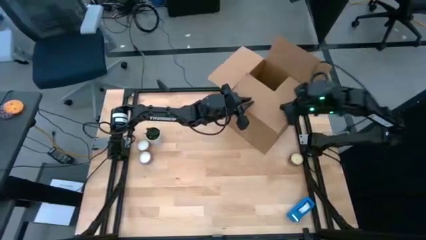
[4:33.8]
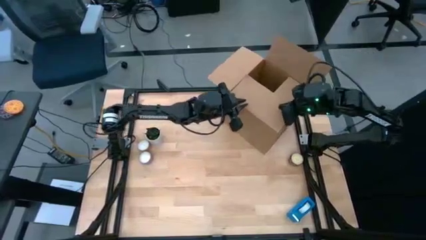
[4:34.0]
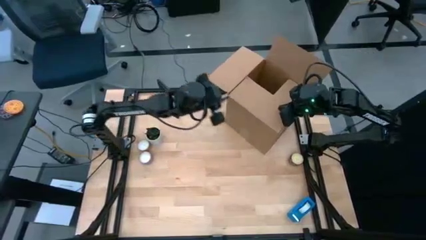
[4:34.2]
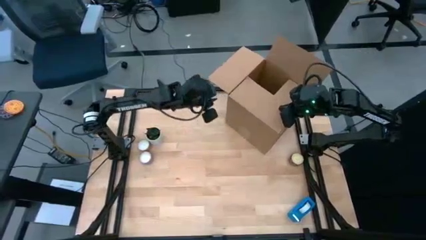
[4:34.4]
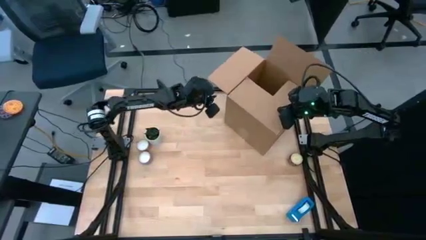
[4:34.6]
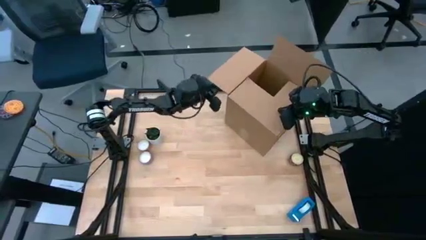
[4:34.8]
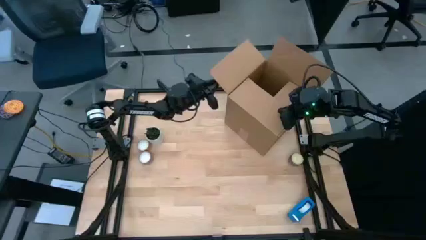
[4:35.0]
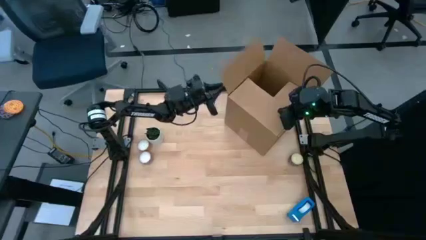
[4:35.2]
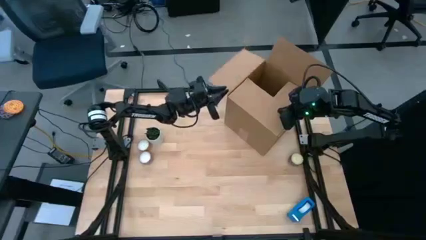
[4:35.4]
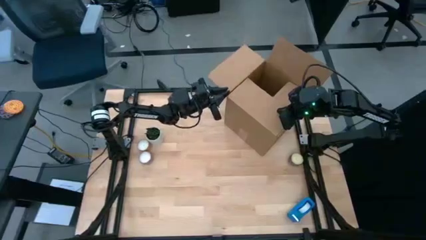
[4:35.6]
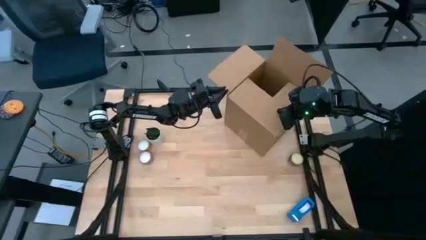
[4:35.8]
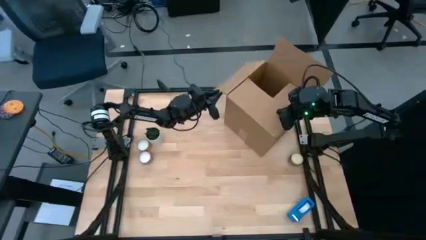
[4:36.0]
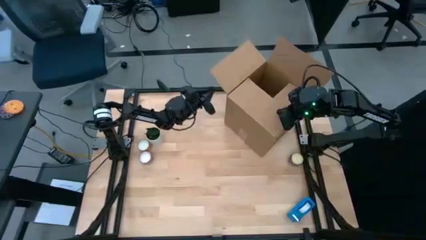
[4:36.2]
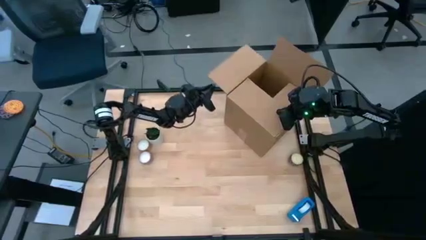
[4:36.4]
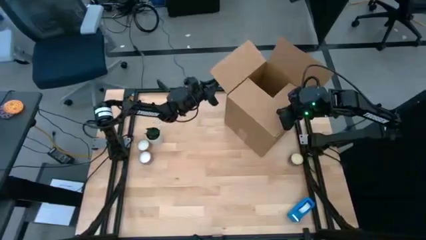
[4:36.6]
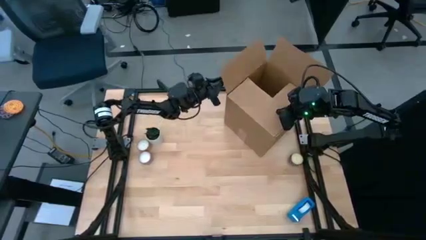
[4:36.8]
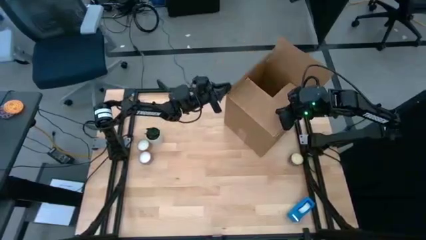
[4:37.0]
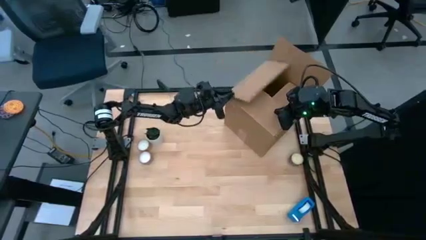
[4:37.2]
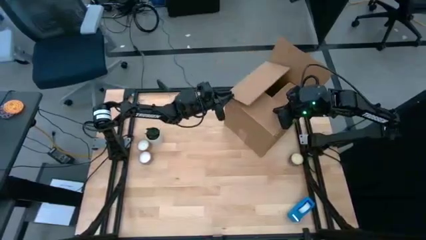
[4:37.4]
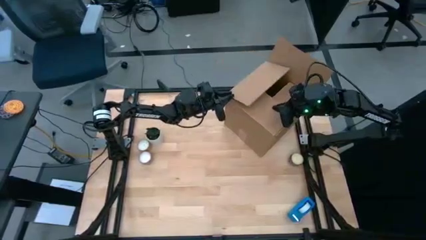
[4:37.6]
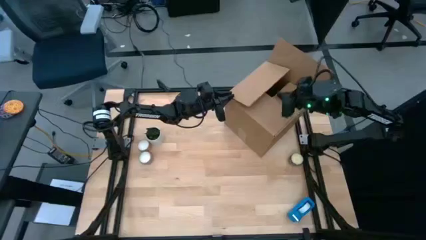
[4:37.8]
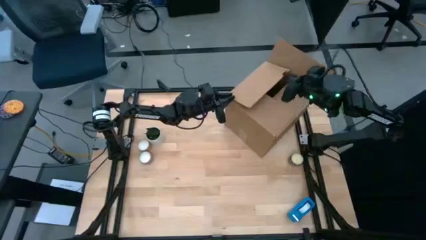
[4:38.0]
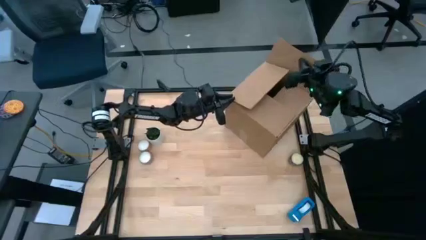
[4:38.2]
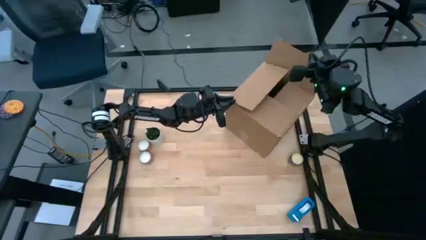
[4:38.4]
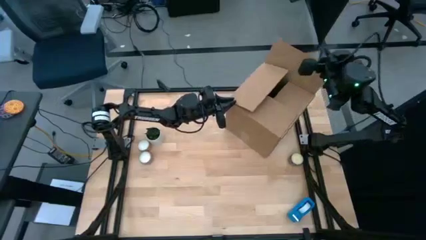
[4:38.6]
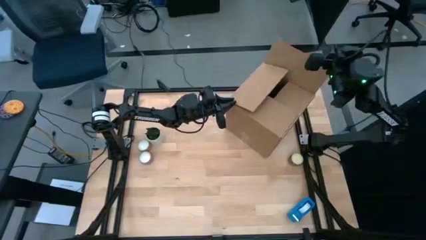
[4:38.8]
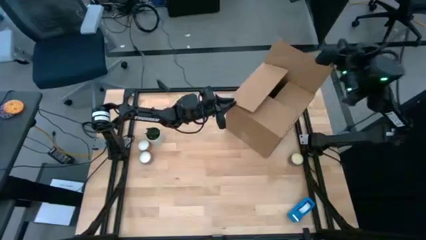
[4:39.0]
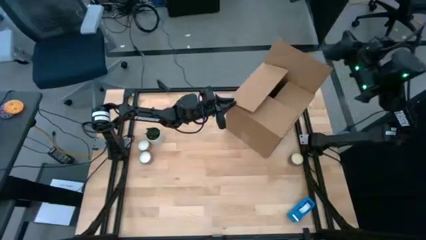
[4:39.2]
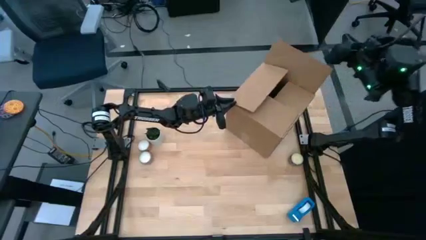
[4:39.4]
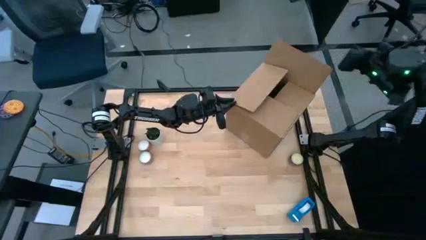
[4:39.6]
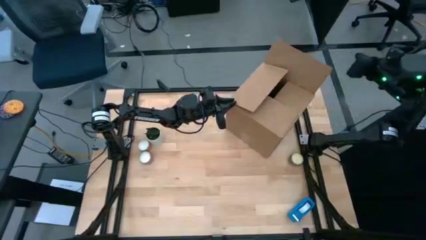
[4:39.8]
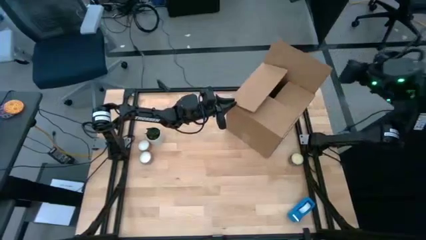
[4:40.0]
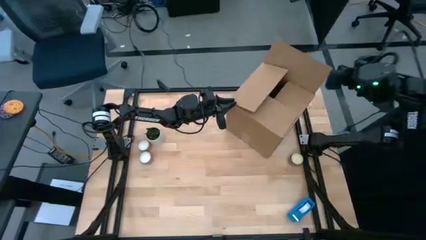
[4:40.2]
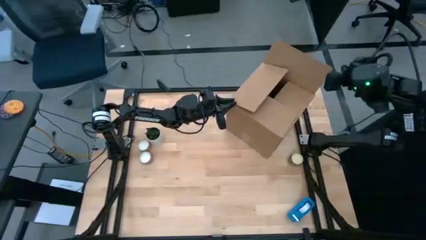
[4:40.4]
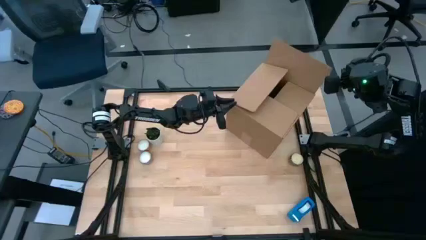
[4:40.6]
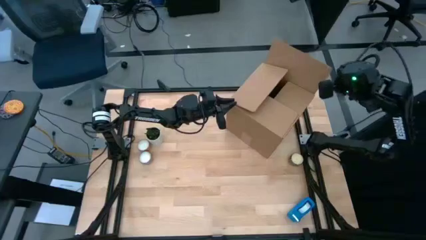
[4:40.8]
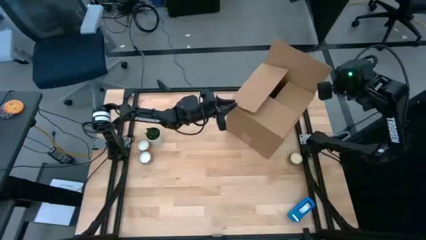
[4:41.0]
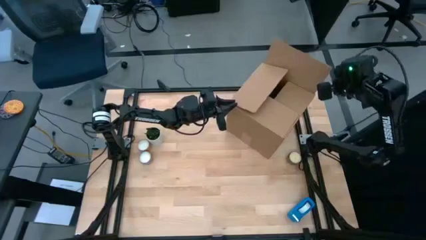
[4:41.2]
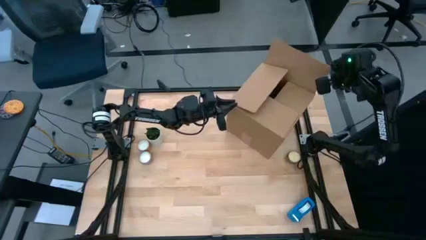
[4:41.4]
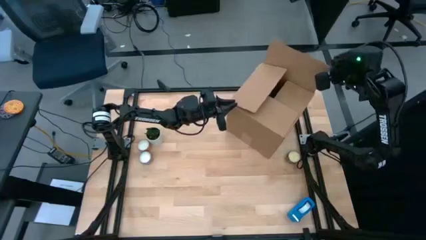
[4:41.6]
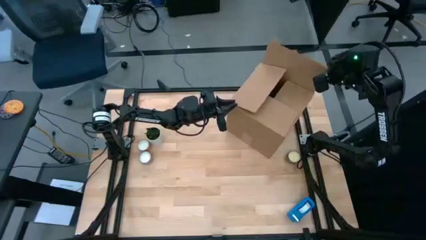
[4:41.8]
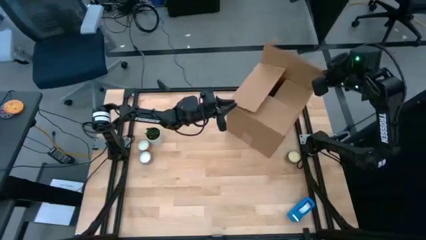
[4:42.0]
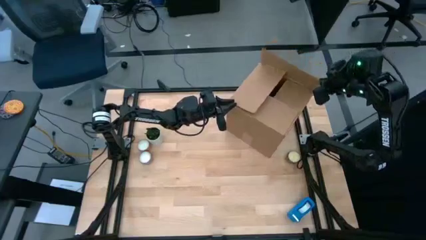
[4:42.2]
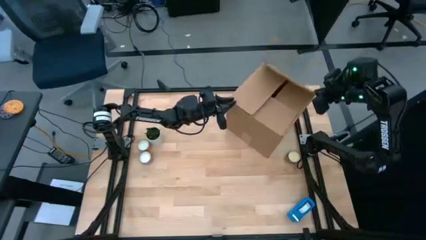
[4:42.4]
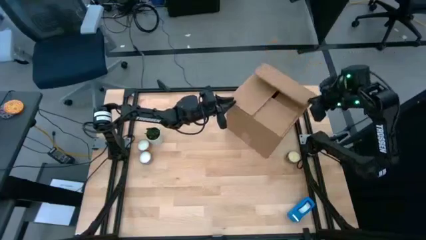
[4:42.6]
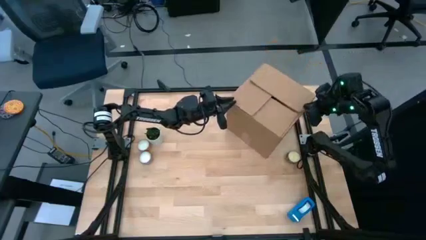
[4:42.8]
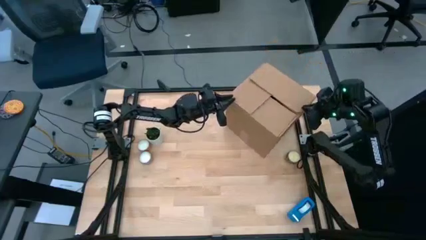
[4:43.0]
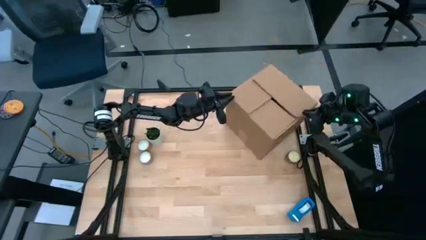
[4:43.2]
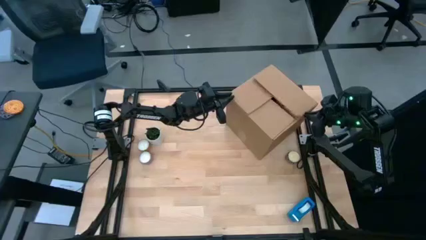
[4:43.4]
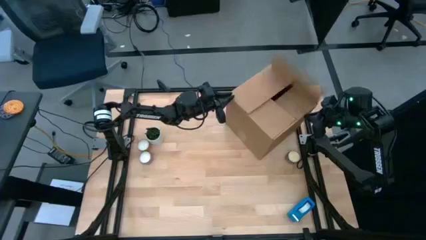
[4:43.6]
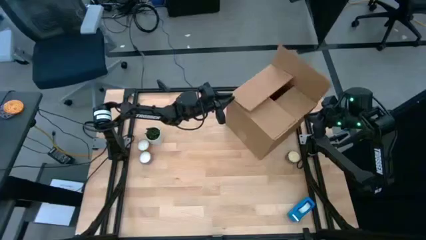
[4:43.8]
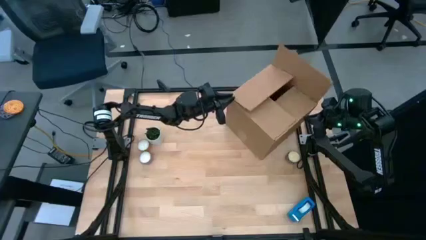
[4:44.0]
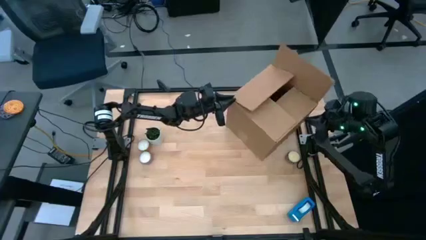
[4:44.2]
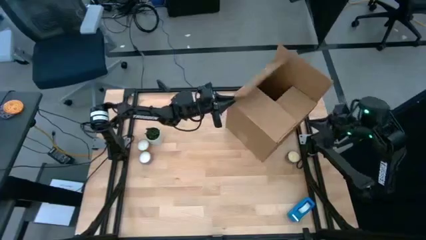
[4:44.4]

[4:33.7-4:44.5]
Task: wrap mug
Close the box

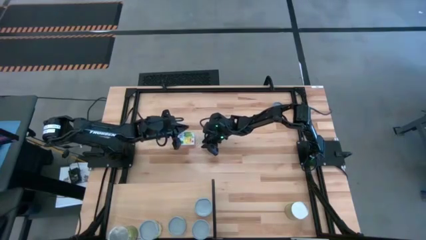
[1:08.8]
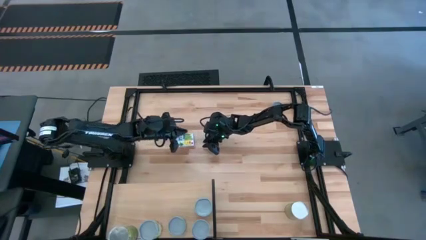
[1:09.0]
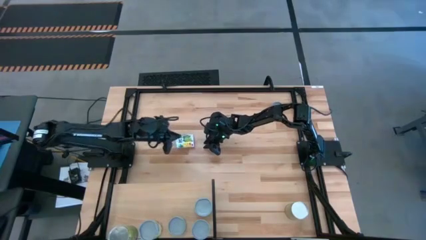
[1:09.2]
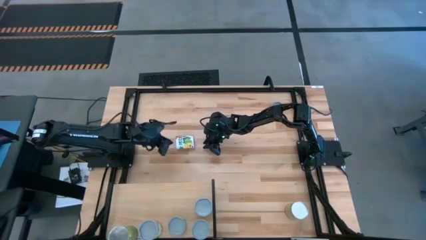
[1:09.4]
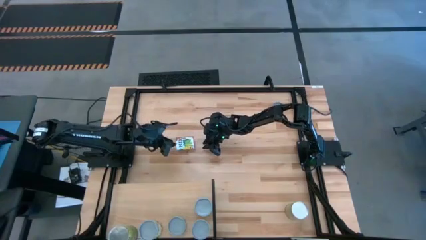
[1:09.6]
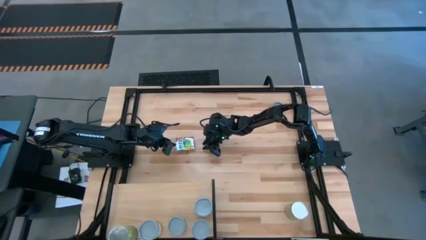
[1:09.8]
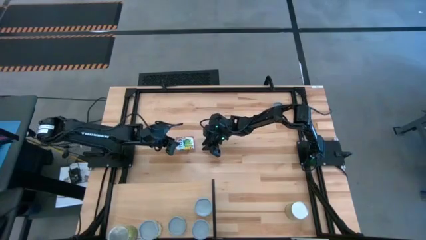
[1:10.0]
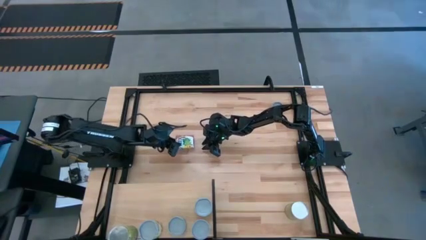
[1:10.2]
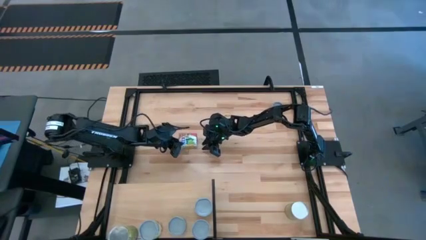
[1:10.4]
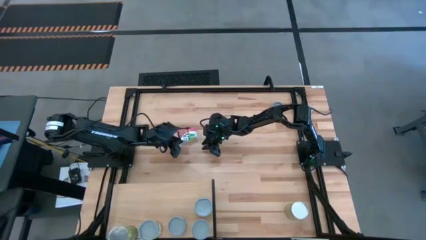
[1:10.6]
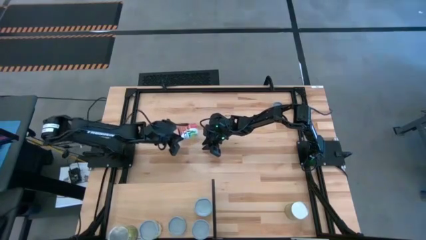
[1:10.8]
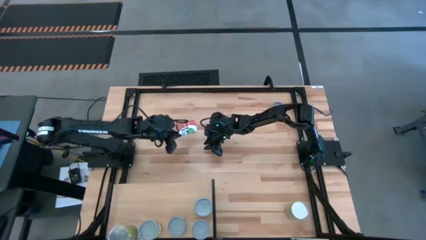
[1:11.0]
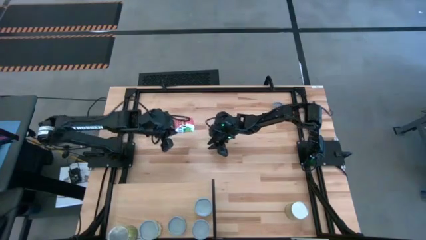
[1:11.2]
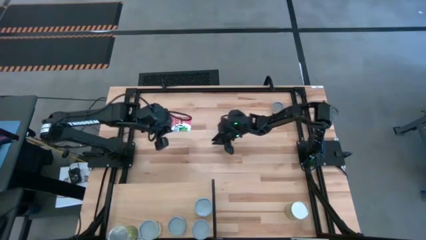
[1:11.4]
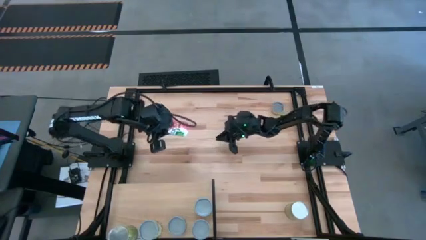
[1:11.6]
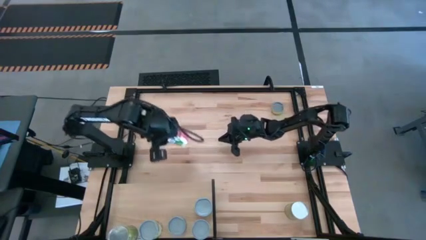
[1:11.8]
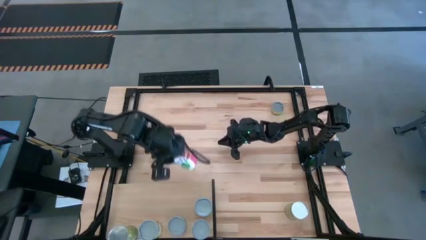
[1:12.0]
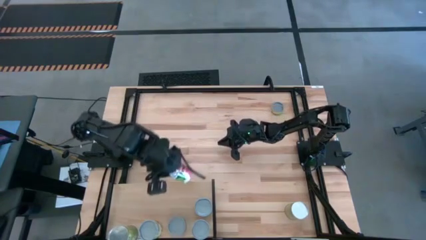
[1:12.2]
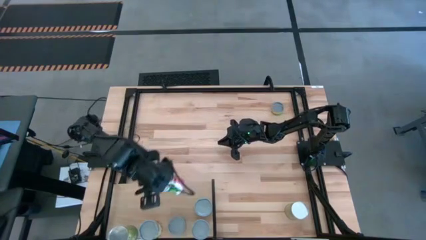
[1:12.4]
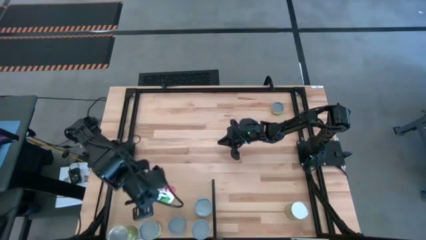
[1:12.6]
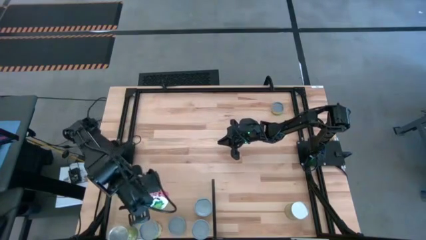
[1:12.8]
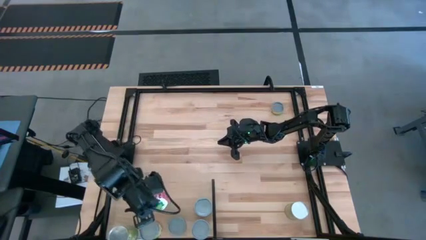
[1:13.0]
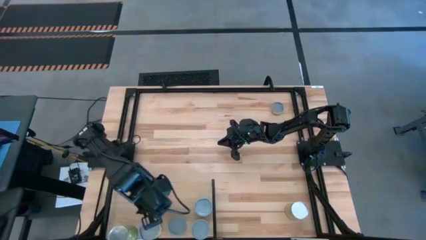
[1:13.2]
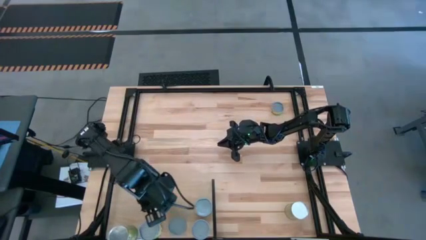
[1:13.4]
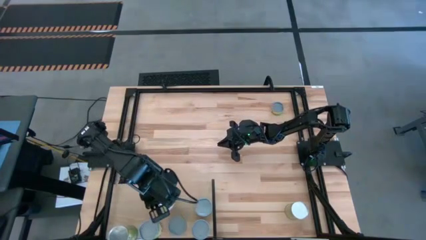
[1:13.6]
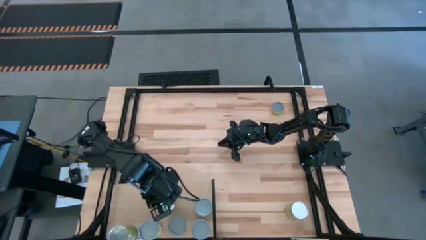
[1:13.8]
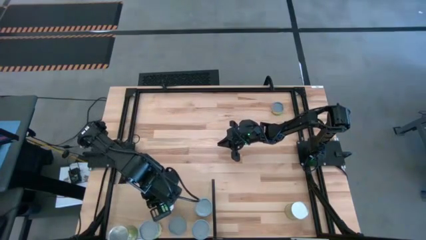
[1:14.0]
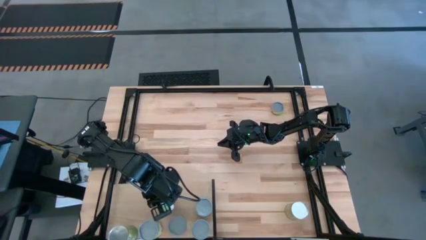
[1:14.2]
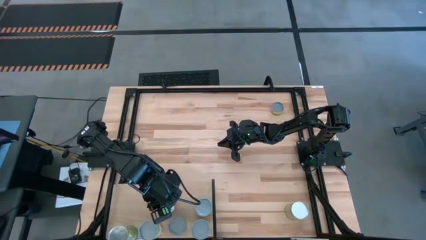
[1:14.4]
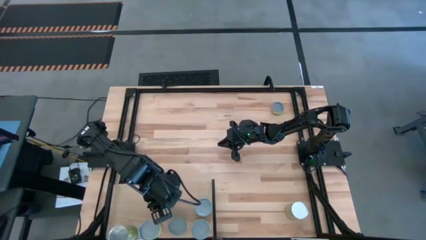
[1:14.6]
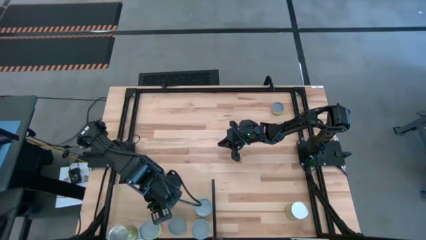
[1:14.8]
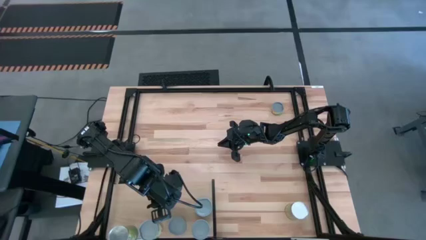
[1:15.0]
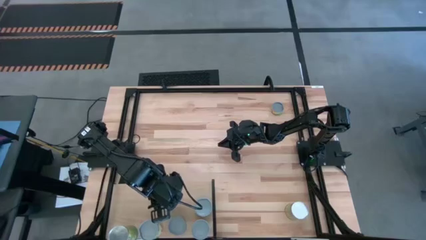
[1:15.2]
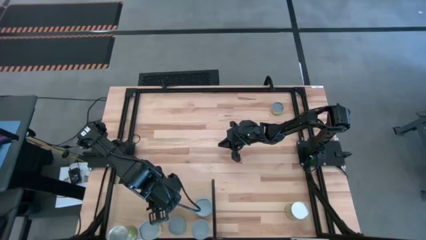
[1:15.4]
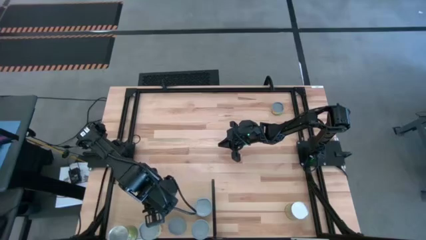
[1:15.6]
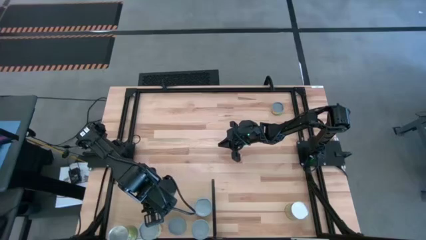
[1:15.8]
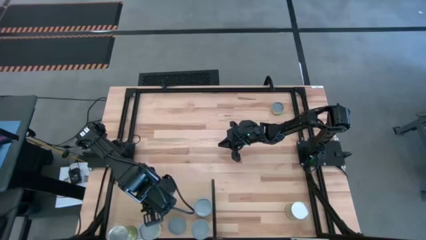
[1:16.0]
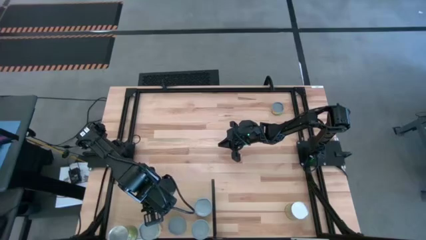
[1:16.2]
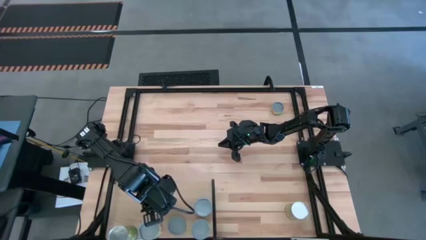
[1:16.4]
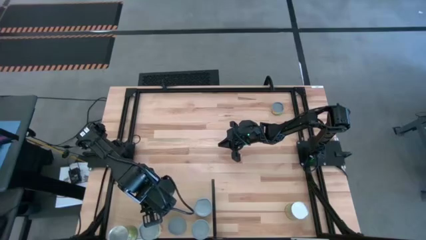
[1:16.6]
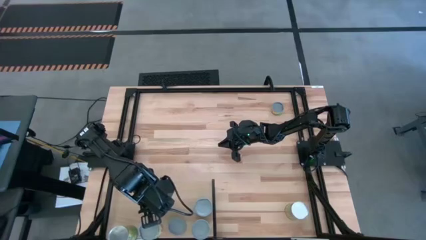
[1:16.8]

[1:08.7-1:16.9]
Task: Pick and place cans onto a shelf
Put the canned mixed fruit on the shelf
